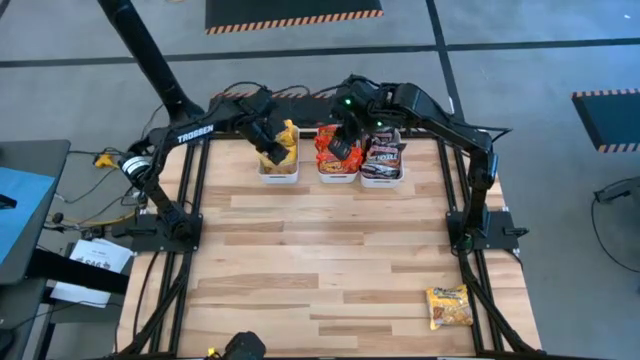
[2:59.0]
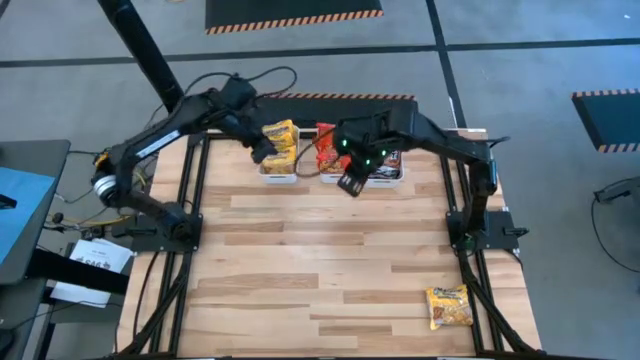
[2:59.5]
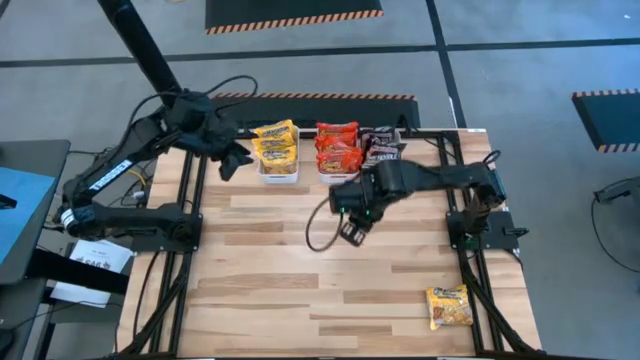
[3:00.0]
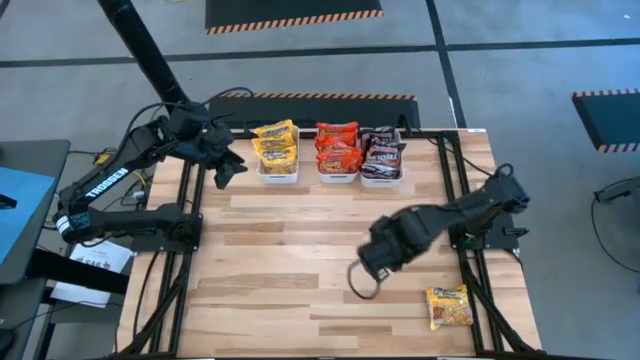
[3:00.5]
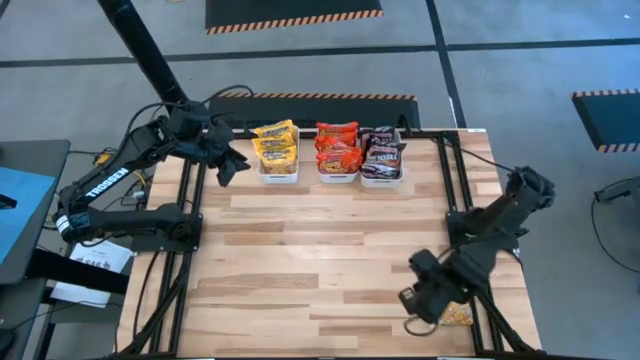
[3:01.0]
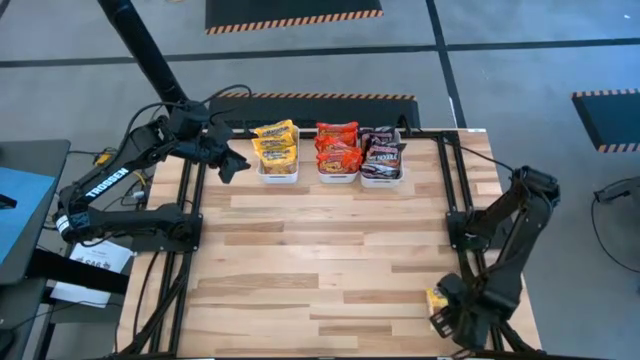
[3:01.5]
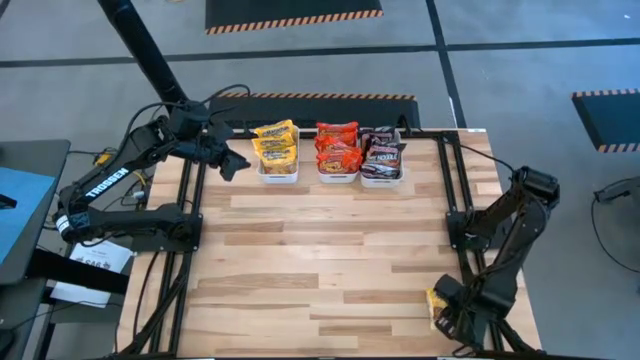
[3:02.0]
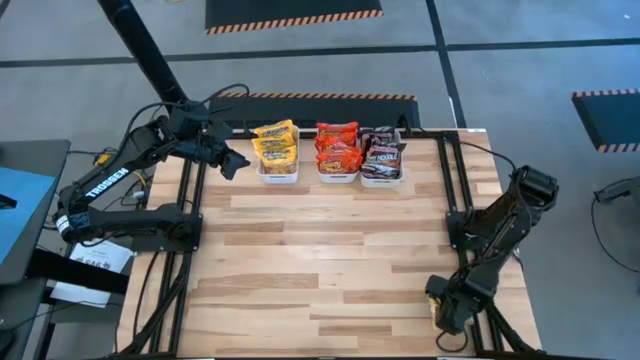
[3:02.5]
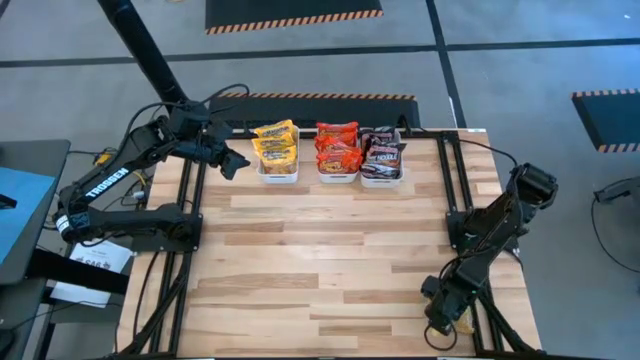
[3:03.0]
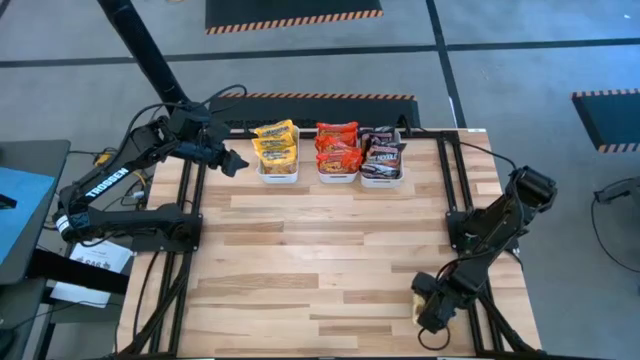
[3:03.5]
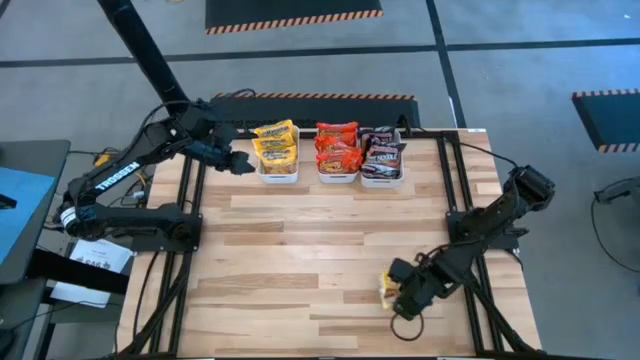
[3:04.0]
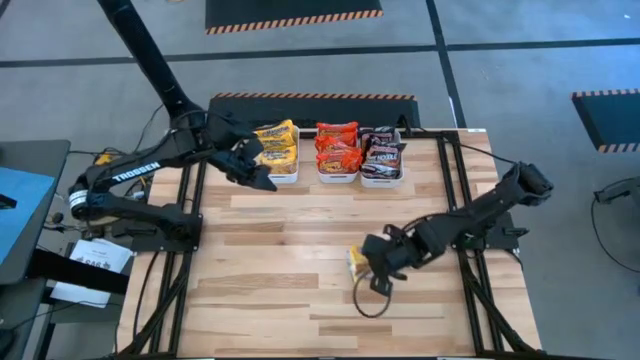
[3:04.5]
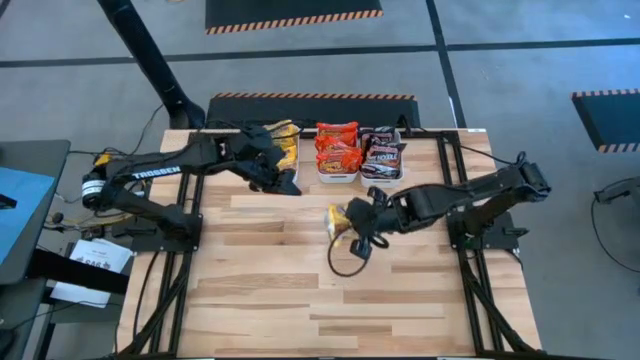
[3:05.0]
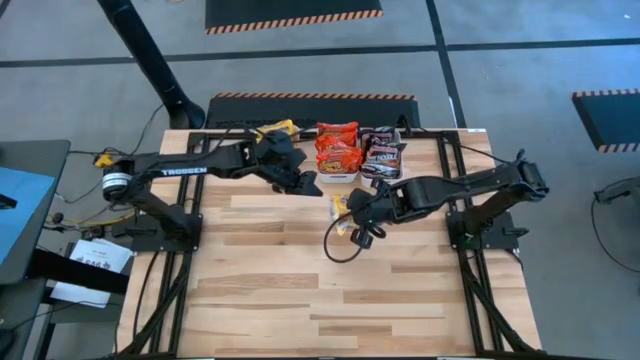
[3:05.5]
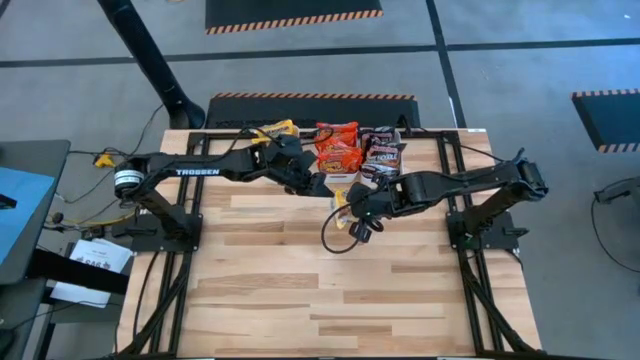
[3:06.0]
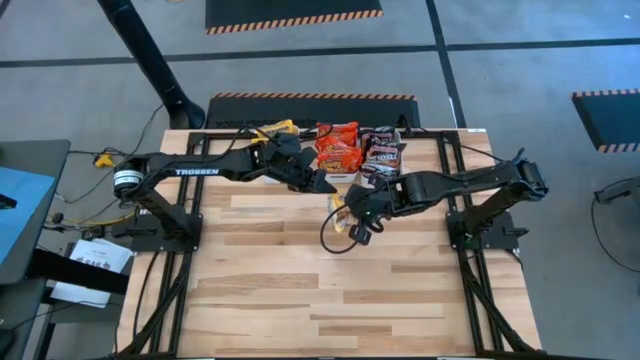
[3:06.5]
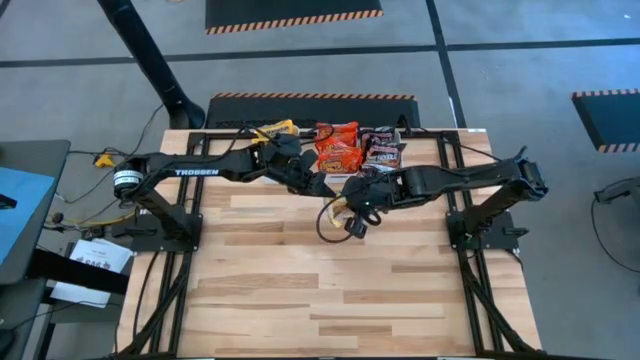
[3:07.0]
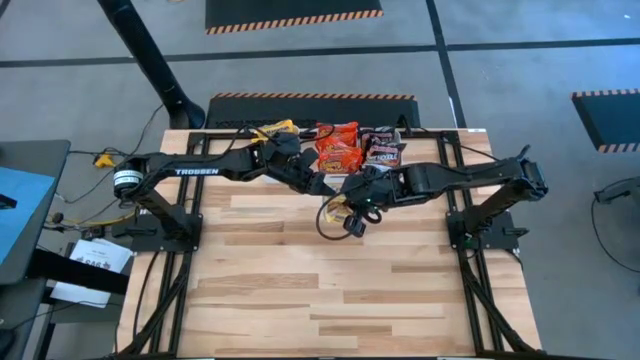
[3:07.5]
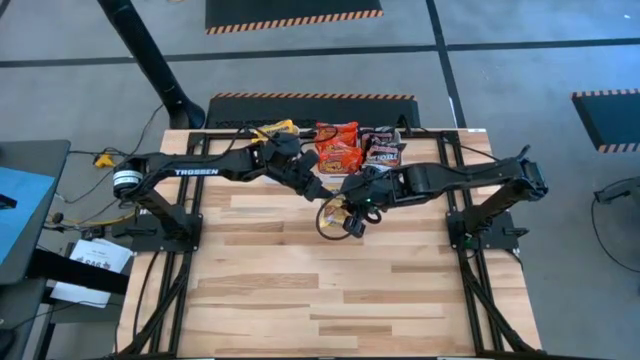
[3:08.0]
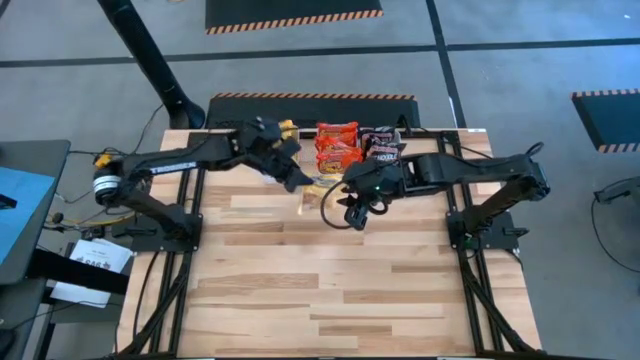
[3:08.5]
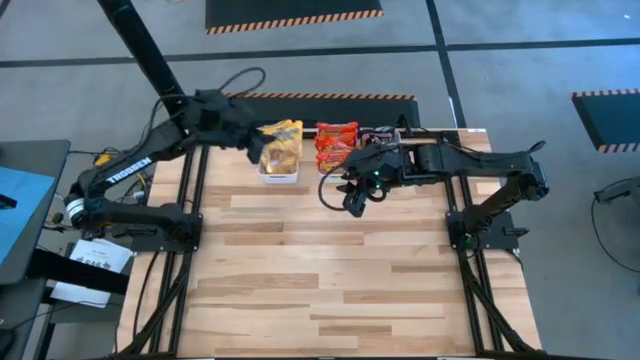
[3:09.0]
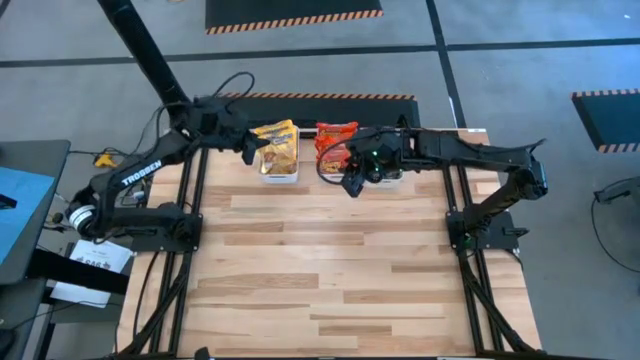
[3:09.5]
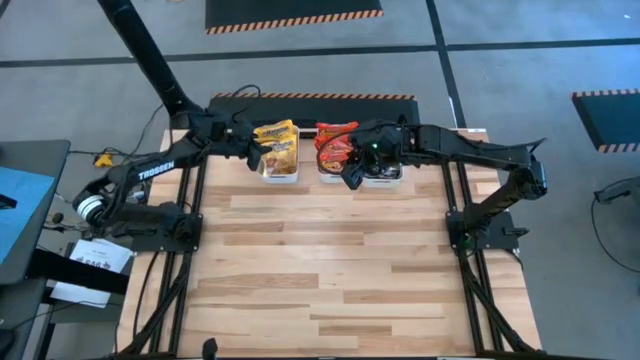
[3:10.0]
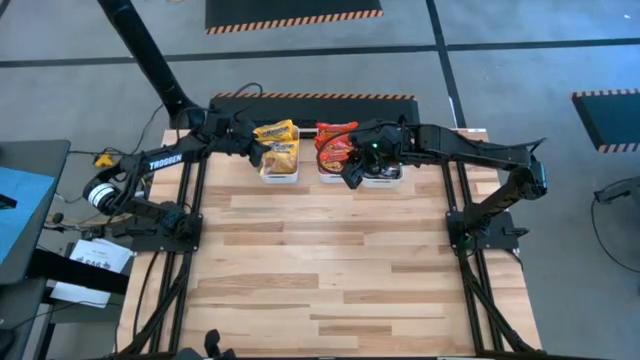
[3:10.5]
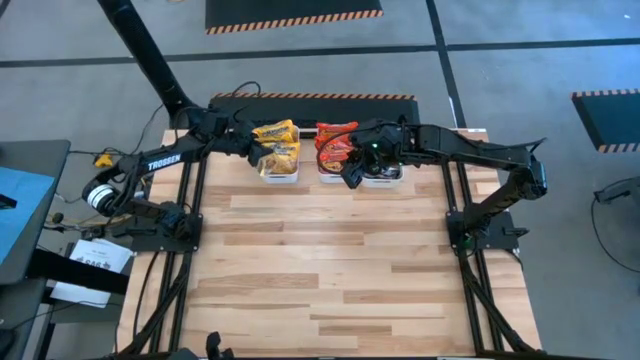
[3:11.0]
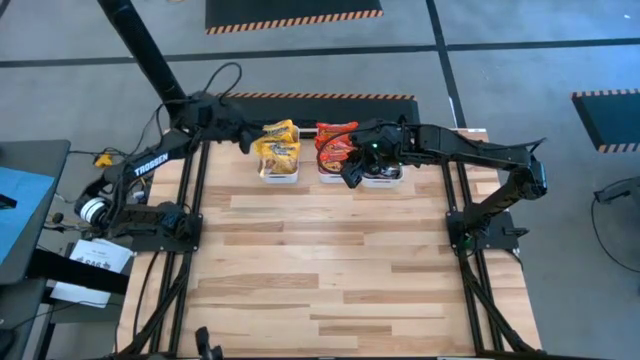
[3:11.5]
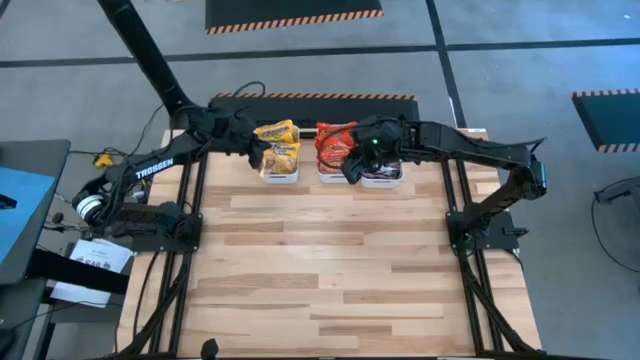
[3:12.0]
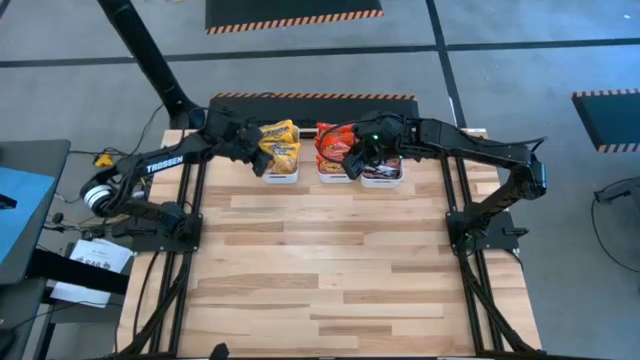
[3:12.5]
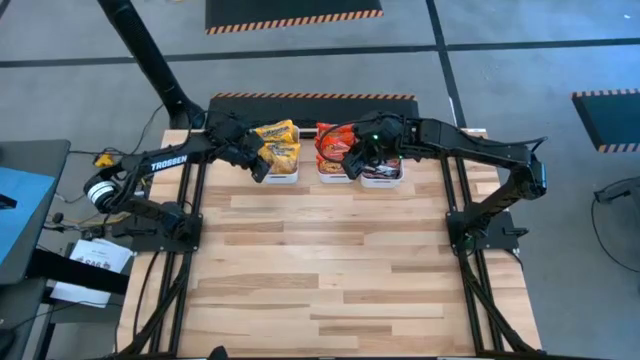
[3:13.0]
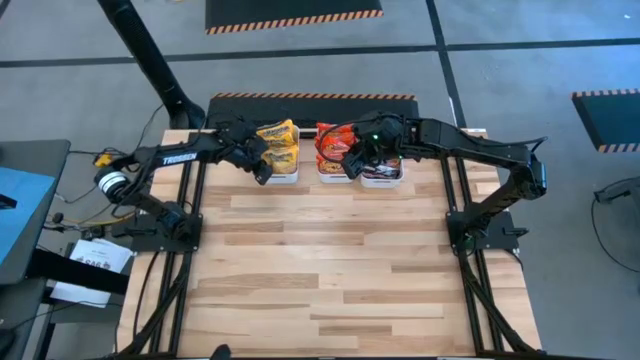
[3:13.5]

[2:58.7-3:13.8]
Task: Sort Maruchan noodles
Put the yellow noodle pack into the left white bin

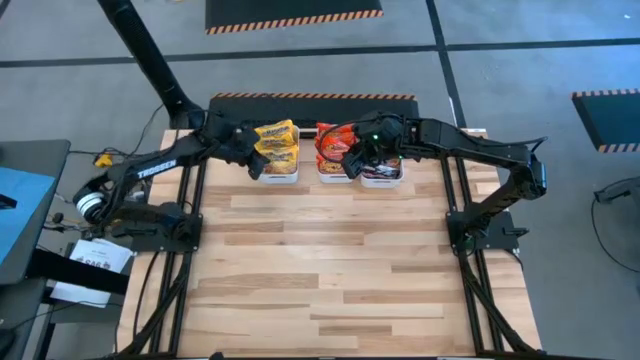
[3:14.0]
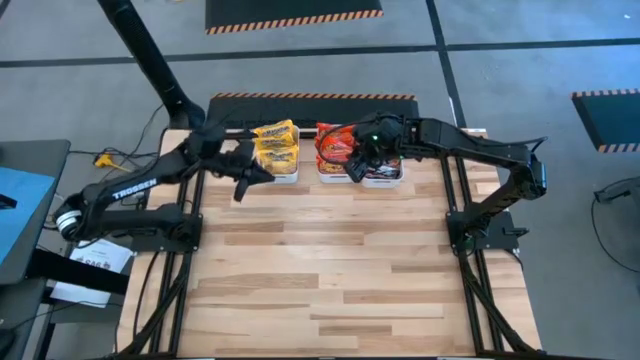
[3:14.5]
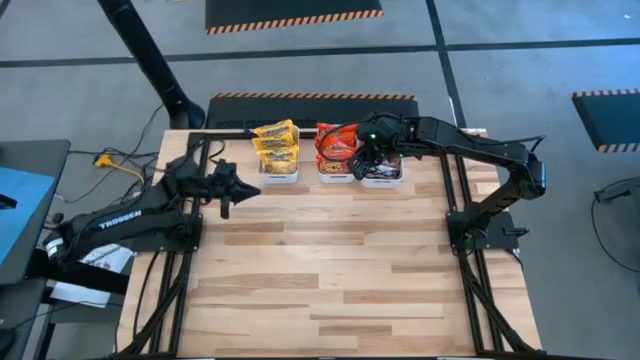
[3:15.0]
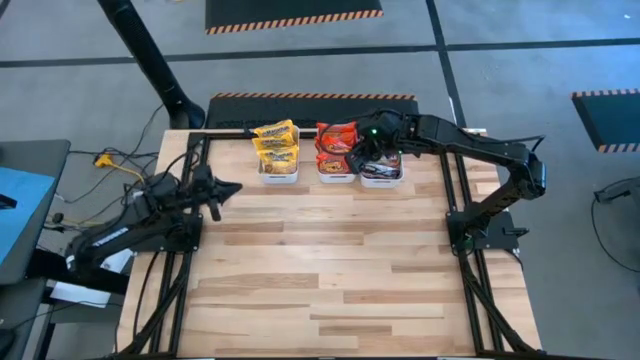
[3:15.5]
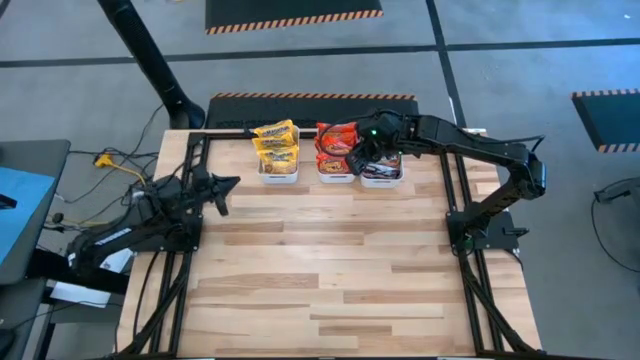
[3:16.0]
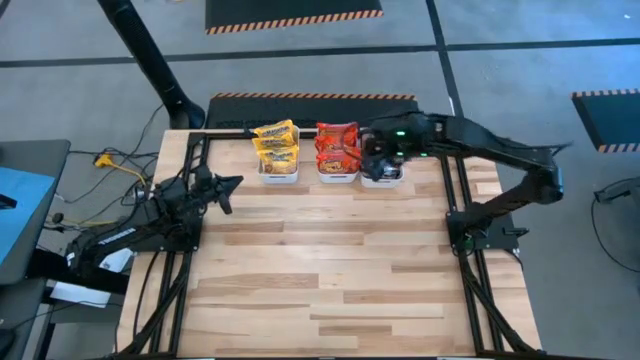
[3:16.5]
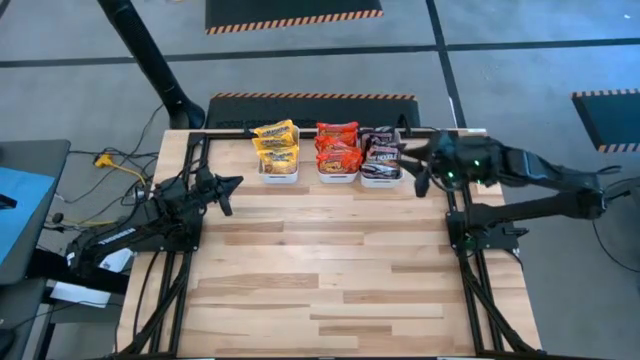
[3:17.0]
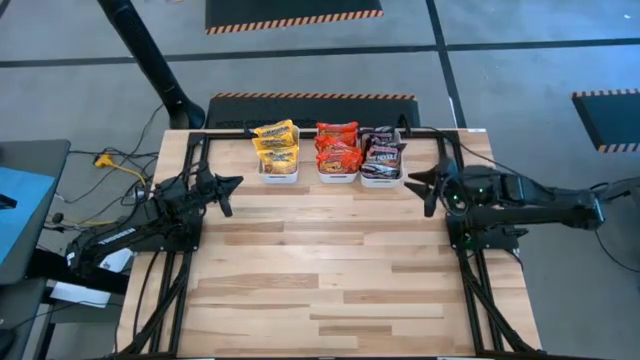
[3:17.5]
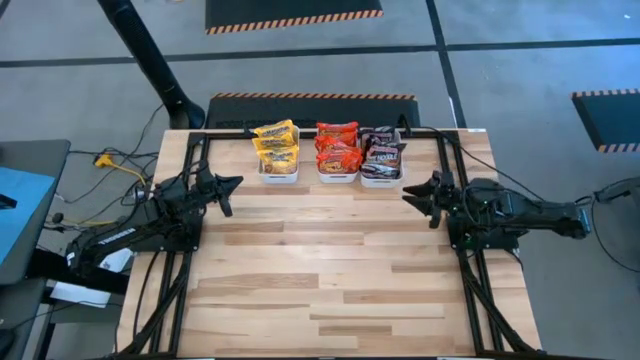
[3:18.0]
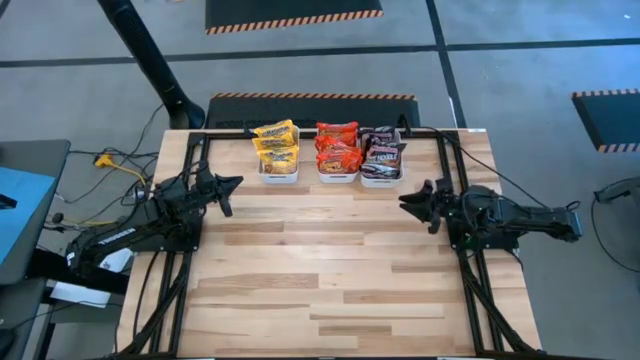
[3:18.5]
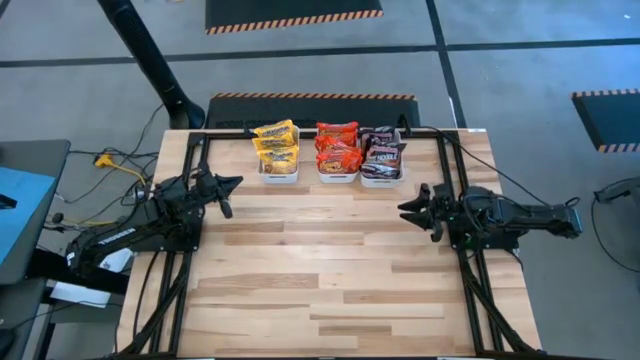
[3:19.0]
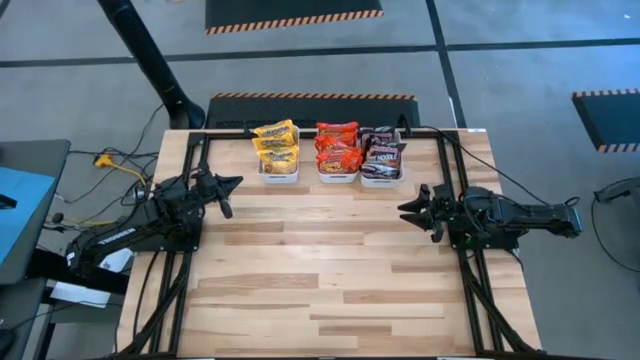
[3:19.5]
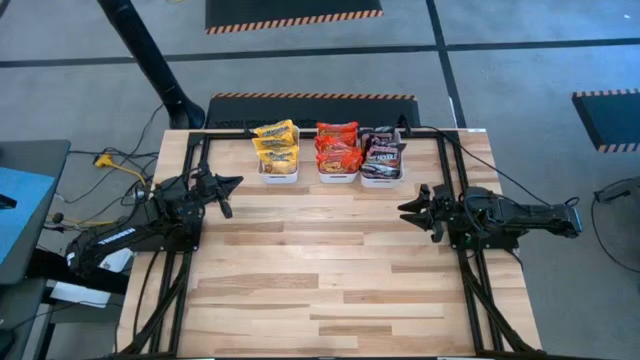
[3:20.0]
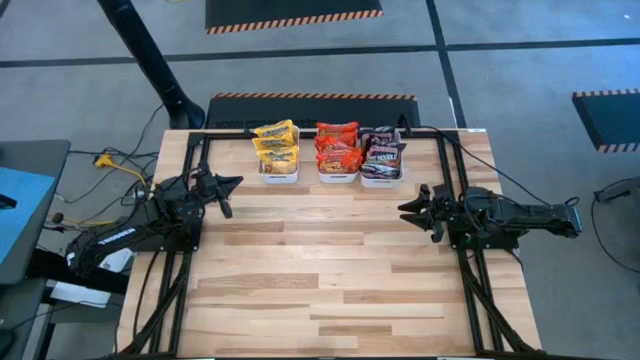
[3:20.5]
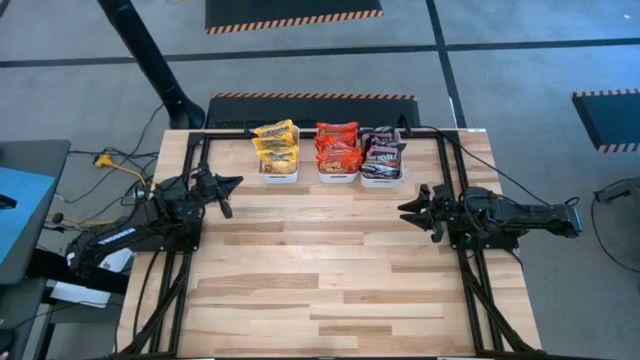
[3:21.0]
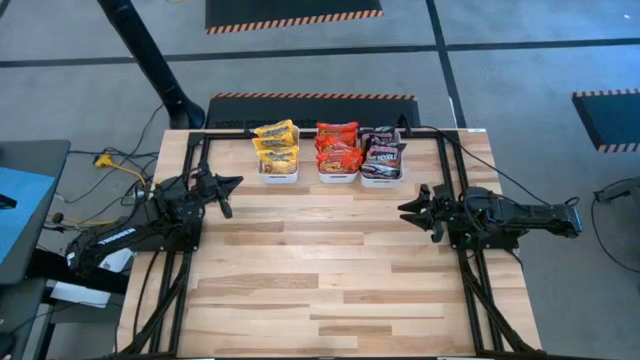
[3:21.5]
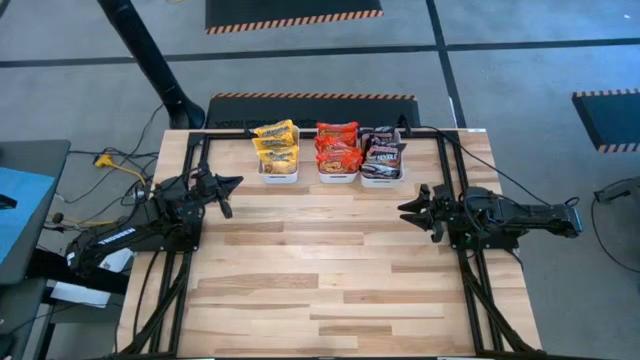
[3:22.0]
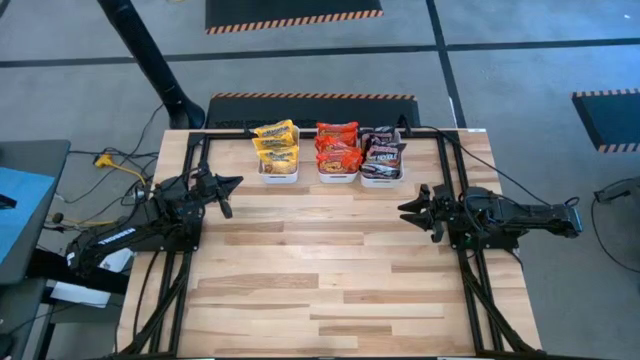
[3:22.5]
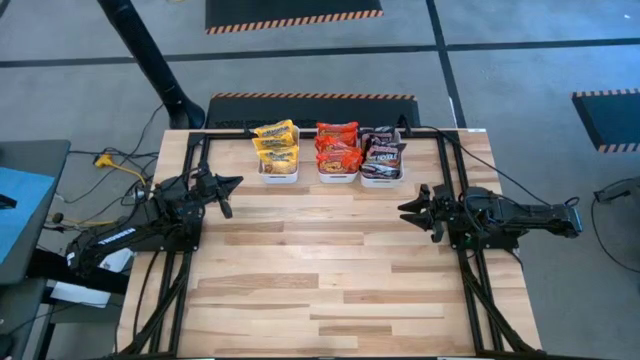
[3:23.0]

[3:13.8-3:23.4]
Return to Home Position
